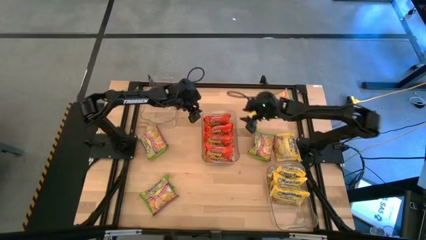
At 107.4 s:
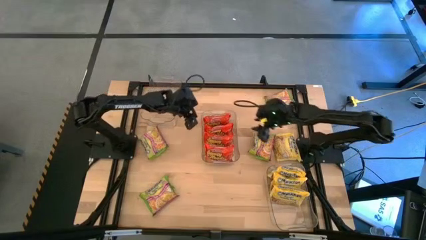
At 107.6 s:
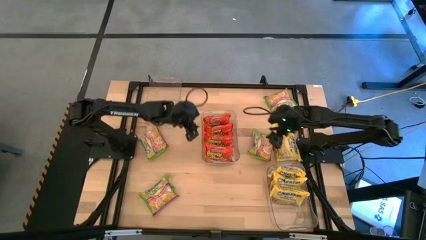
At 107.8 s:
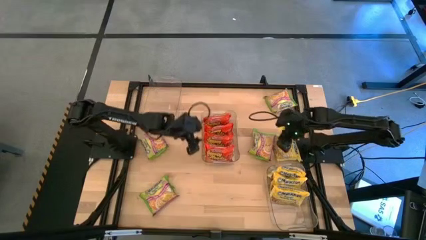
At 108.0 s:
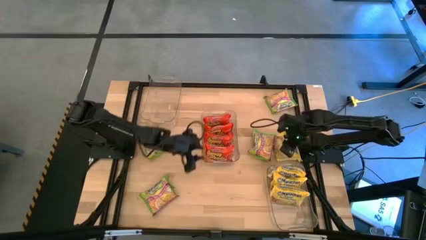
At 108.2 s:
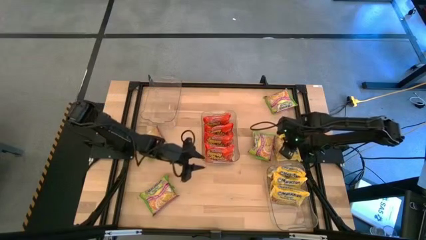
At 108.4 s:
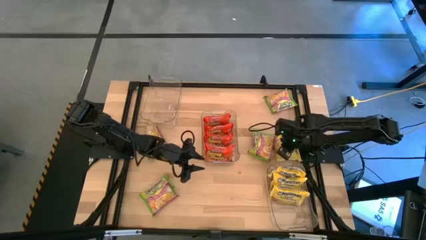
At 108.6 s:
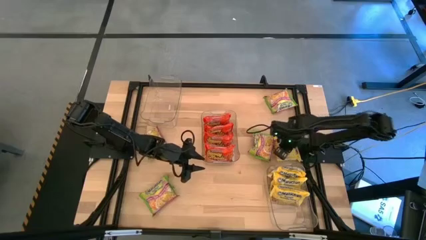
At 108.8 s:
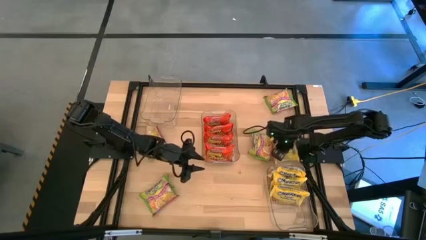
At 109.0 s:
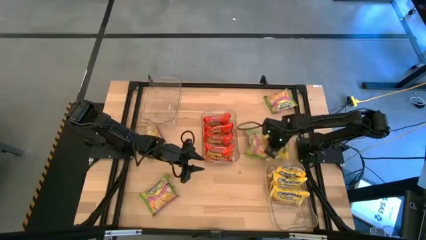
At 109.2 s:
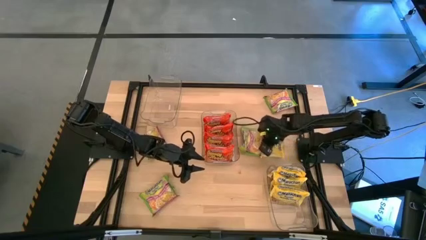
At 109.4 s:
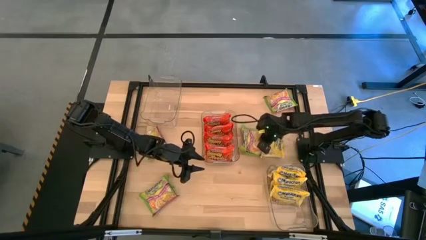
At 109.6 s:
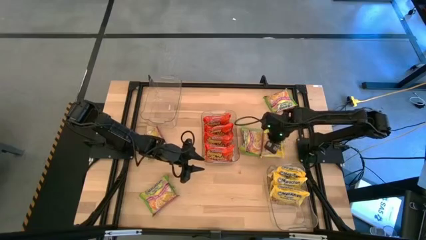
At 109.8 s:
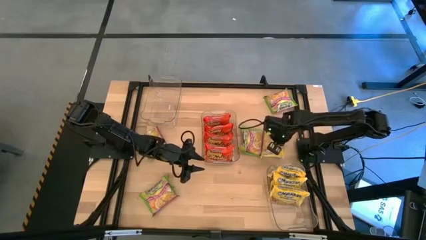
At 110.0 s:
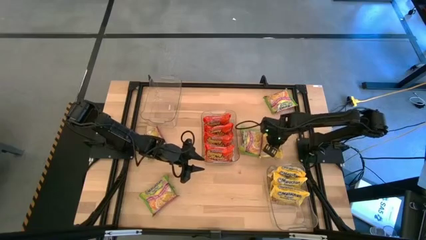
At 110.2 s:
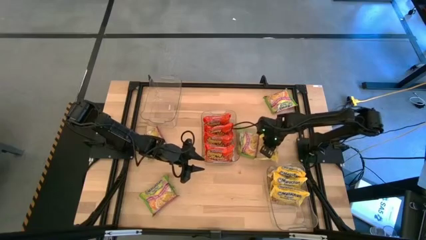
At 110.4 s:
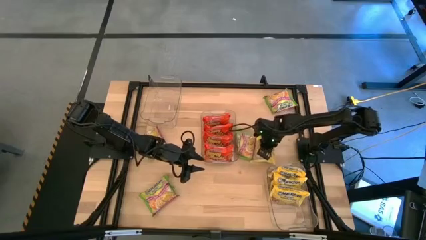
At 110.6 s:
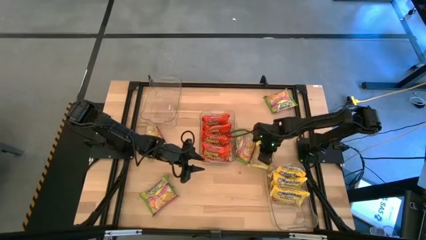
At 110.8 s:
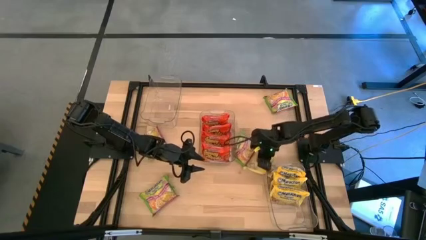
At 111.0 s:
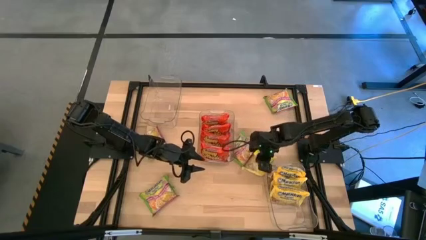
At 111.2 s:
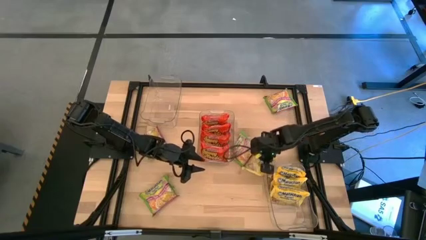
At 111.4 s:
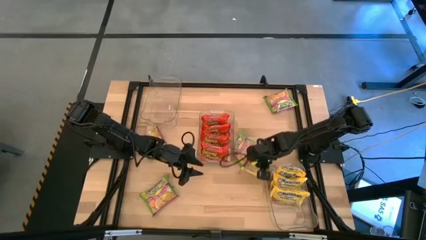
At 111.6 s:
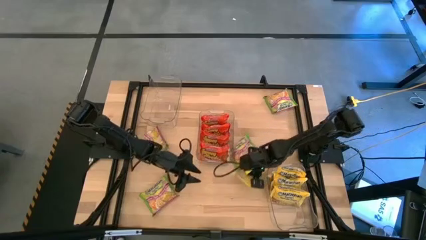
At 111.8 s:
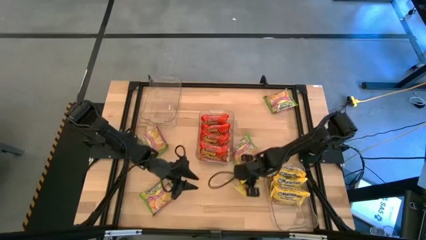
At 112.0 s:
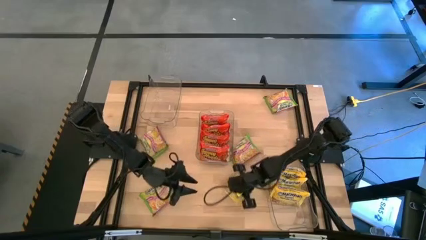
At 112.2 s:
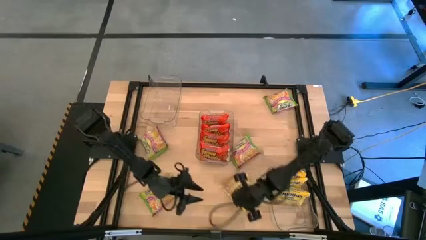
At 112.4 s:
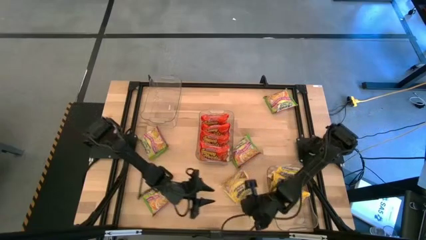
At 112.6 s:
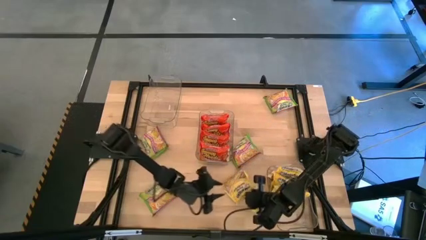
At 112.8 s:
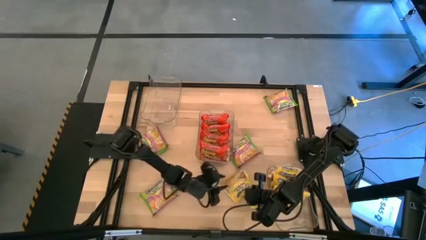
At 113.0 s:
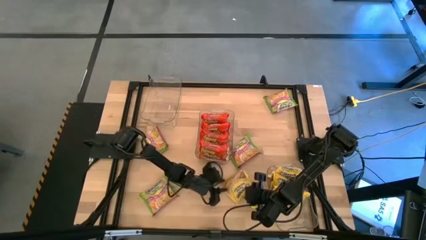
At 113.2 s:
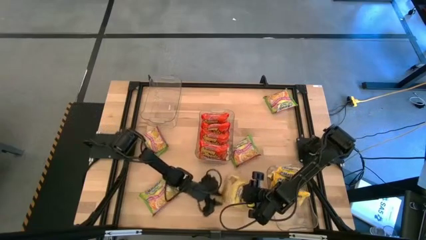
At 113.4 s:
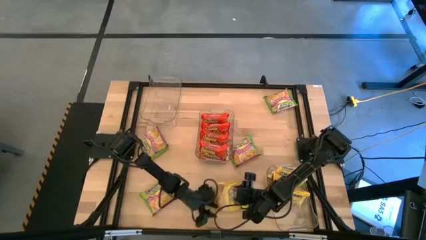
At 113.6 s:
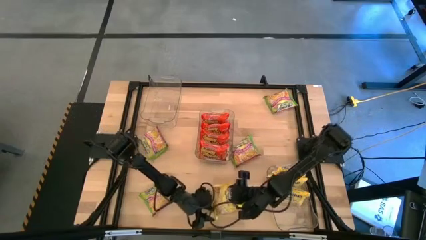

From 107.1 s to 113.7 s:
Task: Sort Maruchan noodles
Move the yellow noodle pack on the table

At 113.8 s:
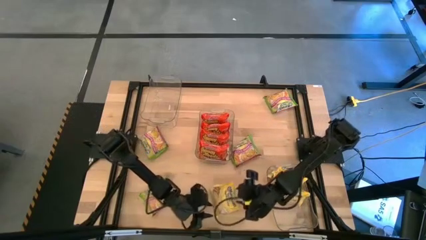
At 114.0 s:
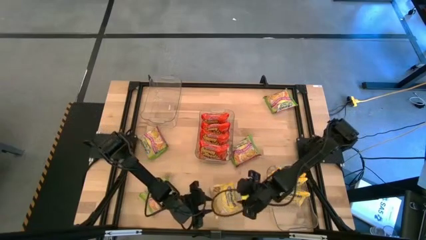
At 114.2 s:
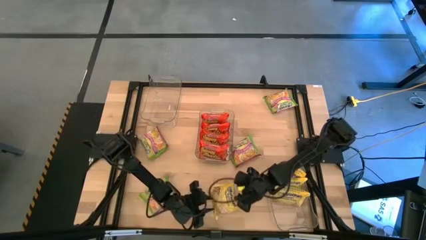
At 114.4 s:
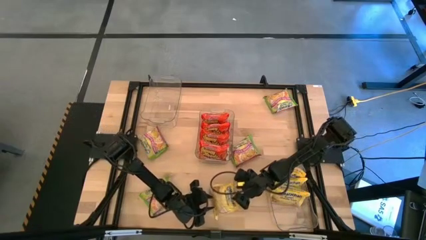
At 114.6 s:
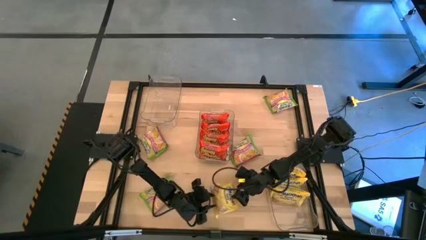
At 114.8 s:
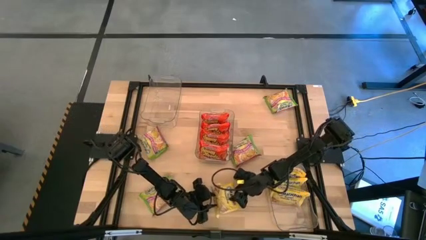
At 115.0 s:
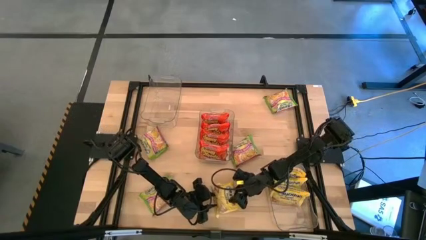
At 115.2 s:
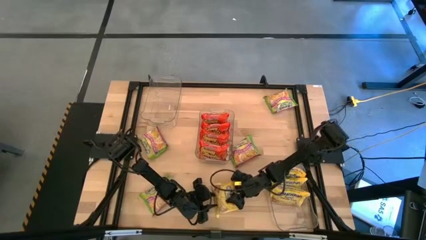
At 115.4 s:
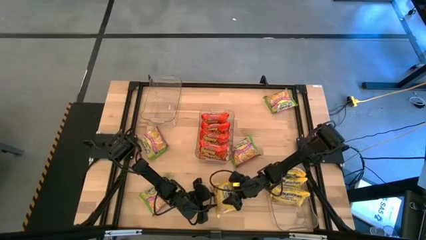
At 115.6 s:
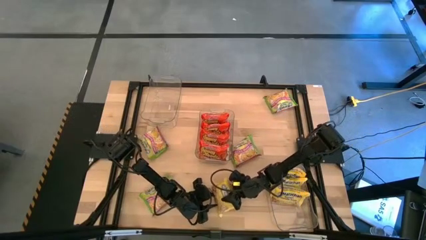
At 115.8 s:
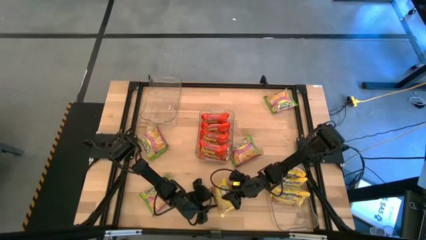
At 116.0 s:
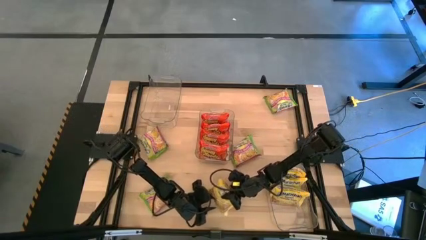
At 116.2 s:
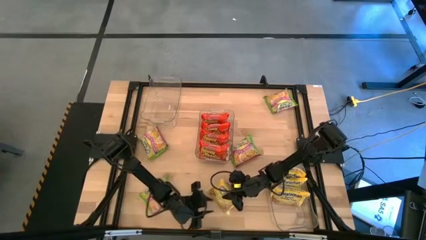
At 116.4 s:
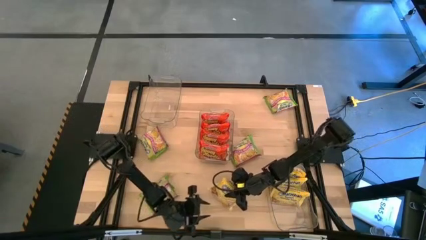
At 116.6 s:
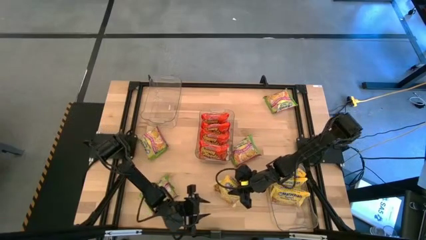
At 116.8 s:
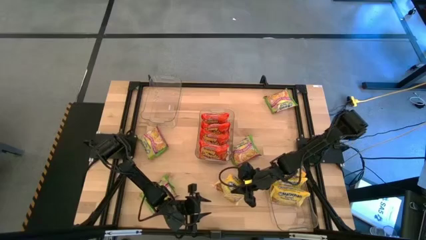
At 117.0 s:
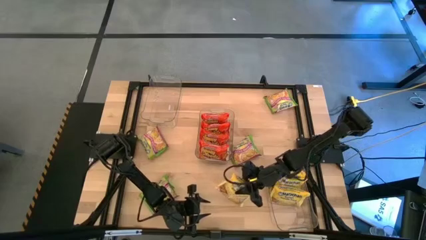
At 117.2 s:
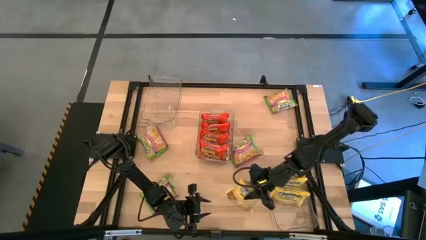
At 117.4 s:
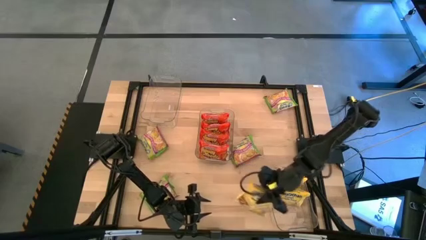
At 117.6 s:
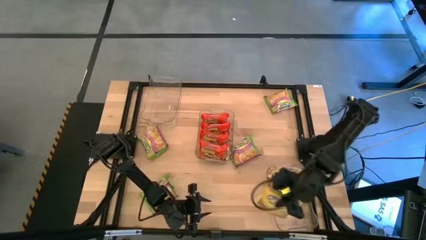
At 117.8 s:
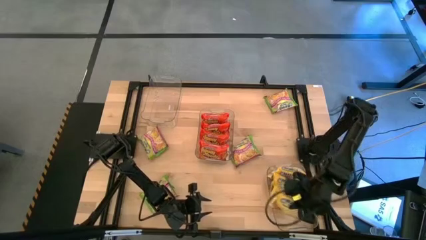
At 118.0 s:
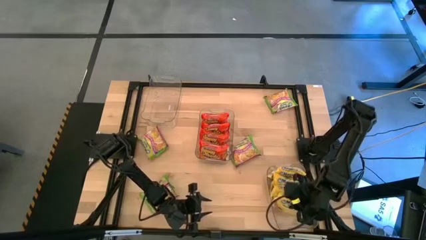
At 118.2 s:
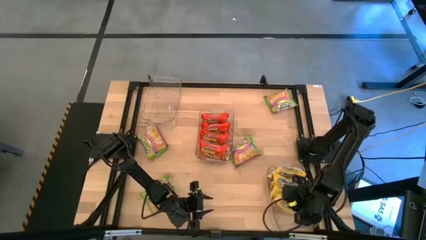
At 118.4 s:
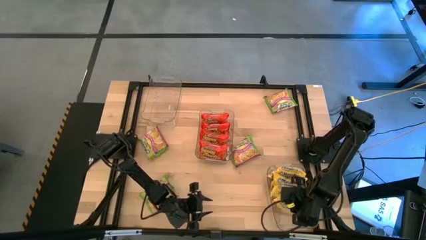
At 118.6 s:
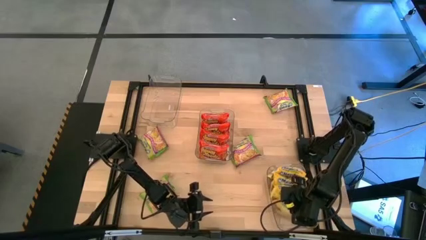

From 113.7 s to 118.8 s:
Put the bottom yellow noodle pack into the bottom transparent bin
